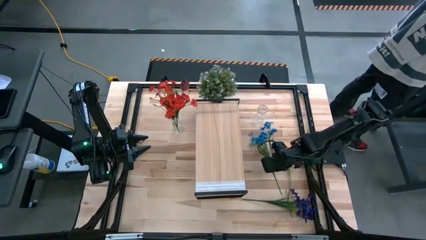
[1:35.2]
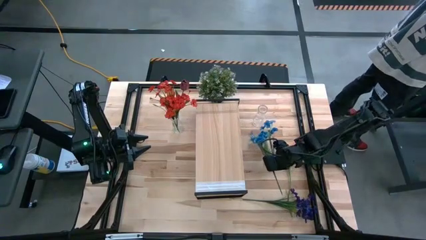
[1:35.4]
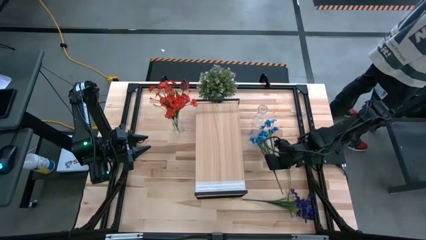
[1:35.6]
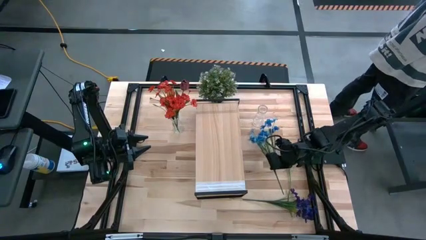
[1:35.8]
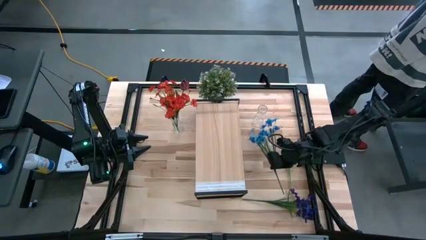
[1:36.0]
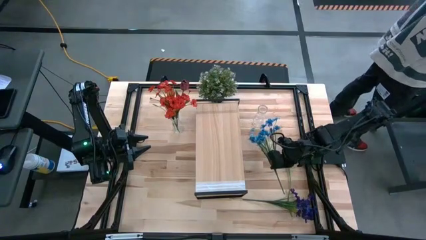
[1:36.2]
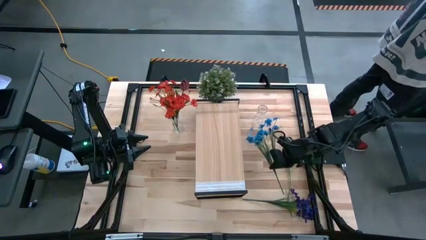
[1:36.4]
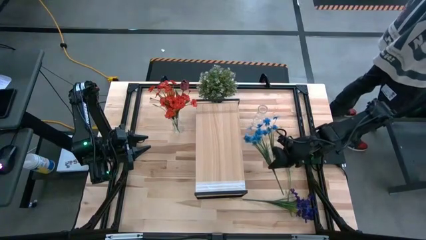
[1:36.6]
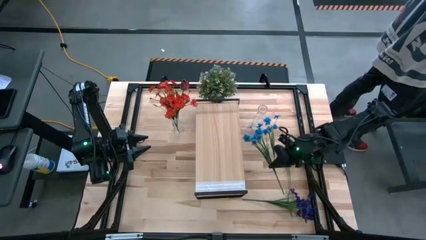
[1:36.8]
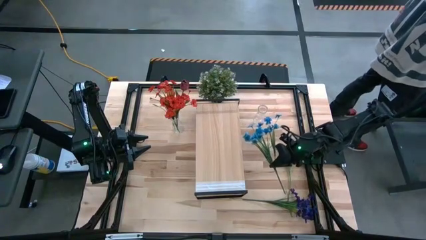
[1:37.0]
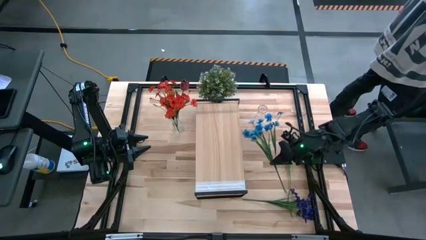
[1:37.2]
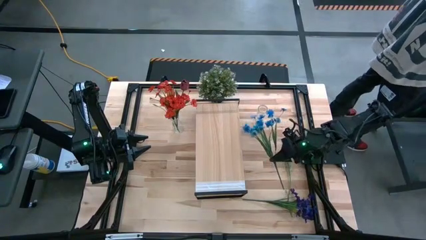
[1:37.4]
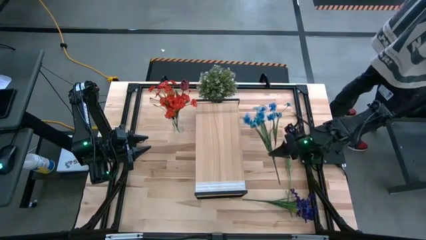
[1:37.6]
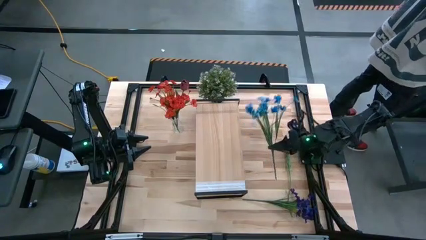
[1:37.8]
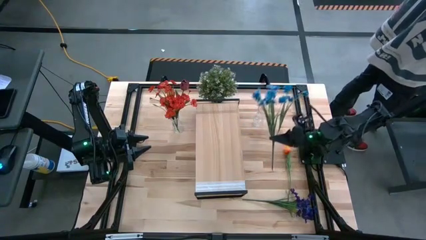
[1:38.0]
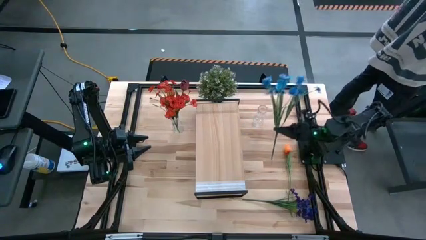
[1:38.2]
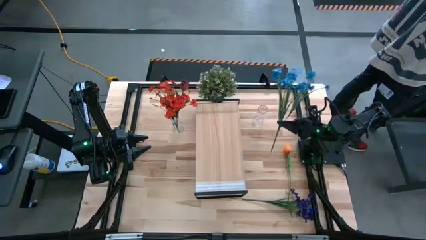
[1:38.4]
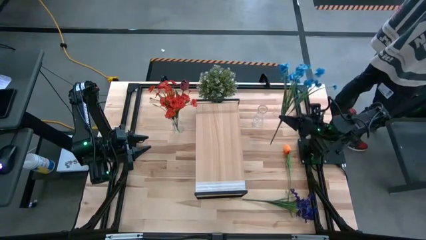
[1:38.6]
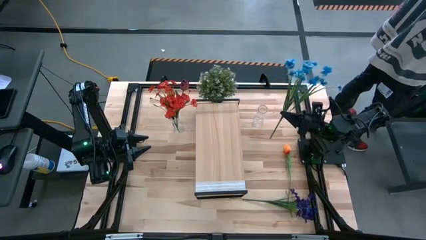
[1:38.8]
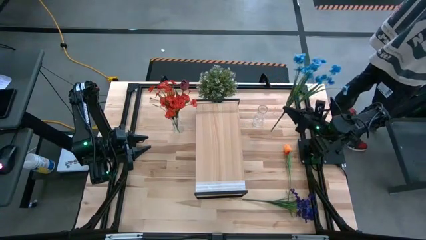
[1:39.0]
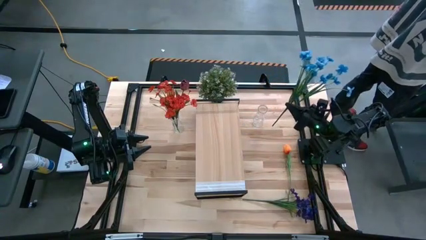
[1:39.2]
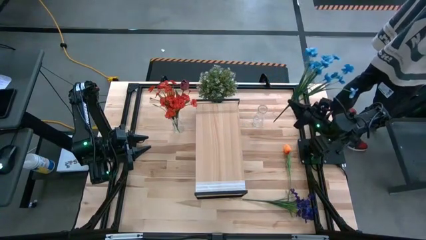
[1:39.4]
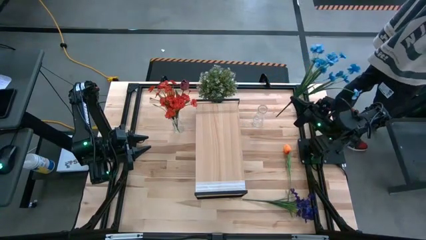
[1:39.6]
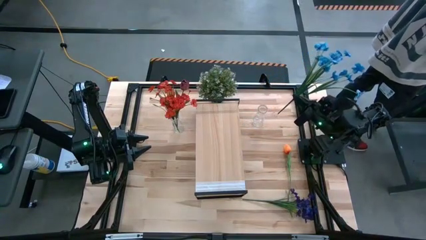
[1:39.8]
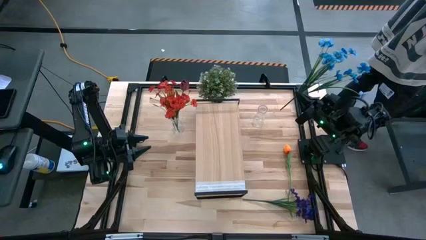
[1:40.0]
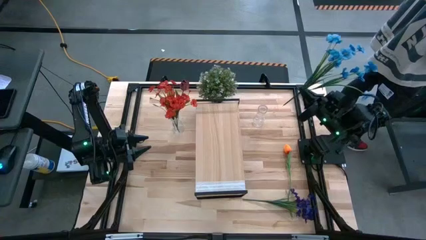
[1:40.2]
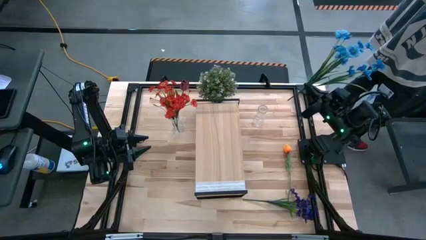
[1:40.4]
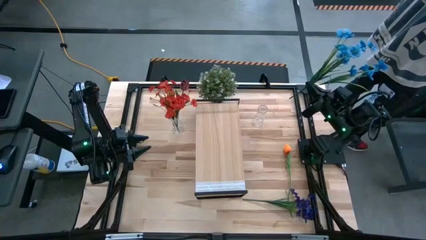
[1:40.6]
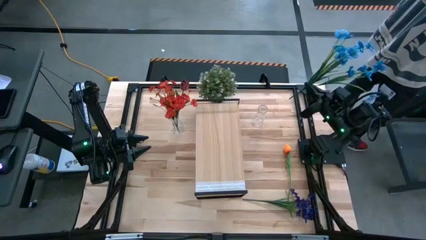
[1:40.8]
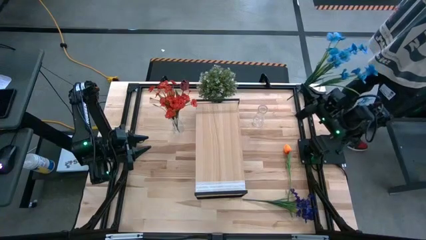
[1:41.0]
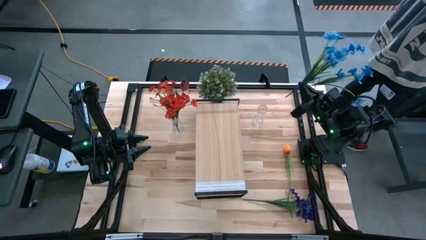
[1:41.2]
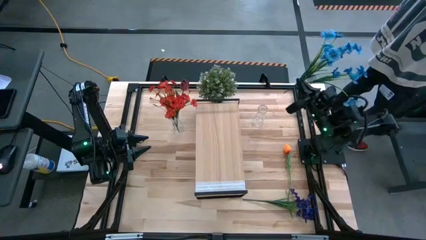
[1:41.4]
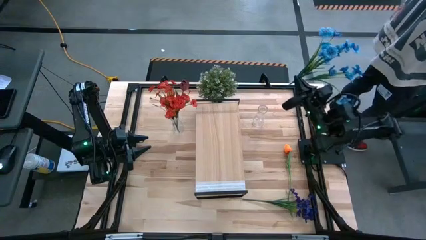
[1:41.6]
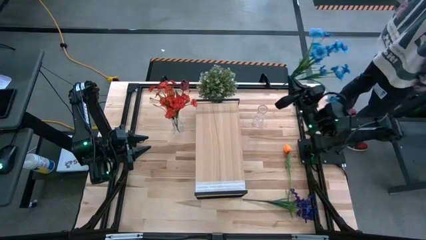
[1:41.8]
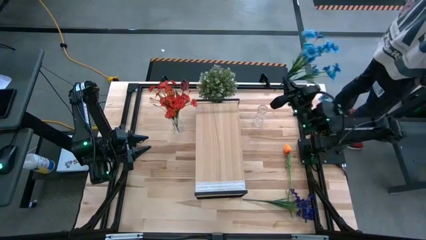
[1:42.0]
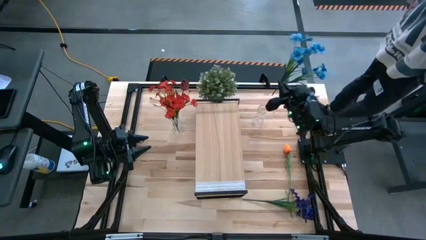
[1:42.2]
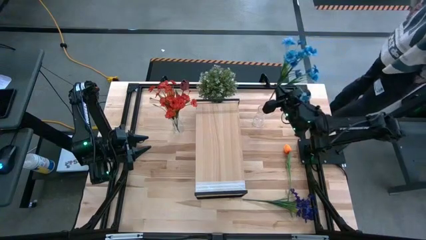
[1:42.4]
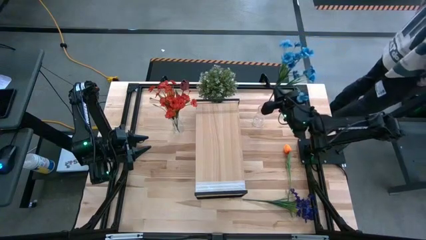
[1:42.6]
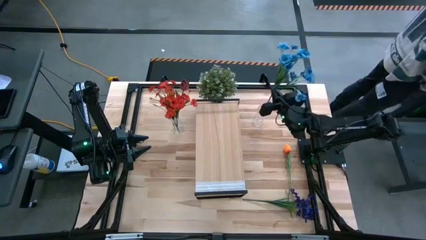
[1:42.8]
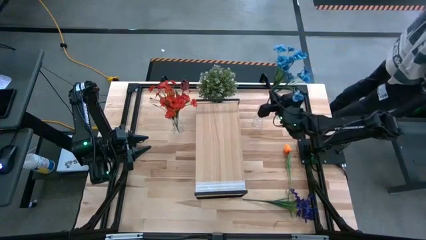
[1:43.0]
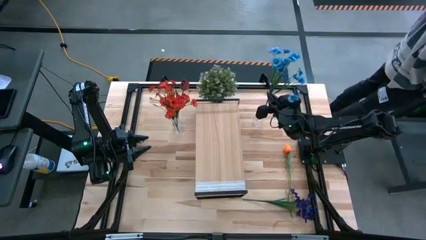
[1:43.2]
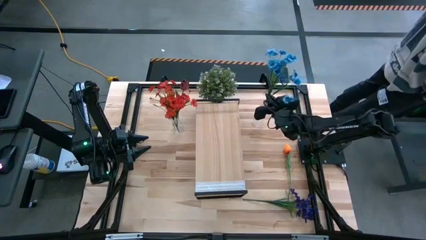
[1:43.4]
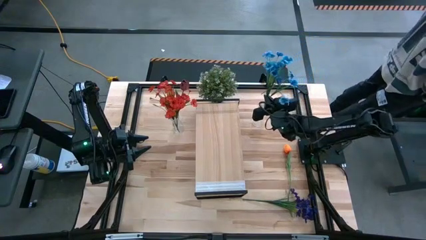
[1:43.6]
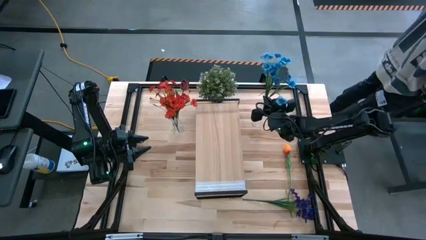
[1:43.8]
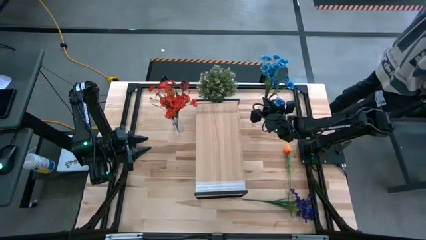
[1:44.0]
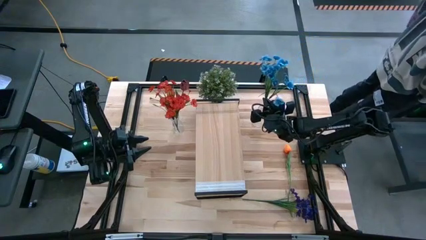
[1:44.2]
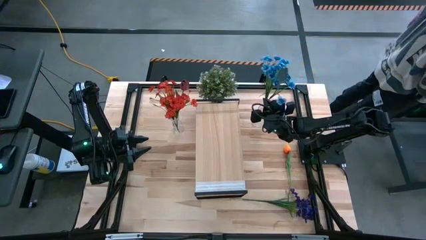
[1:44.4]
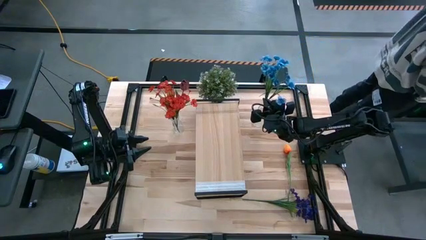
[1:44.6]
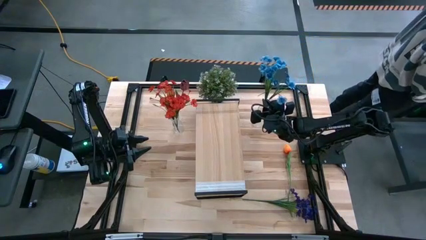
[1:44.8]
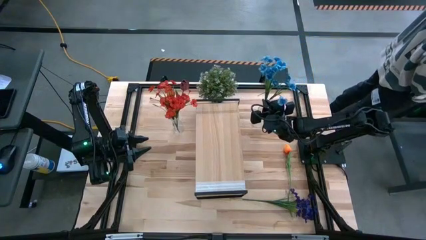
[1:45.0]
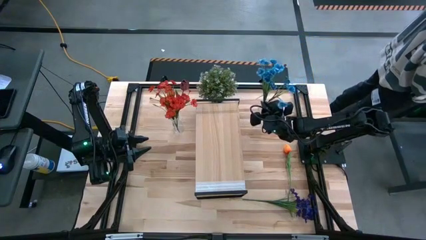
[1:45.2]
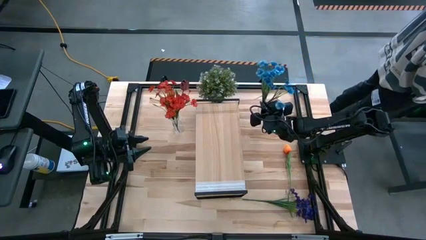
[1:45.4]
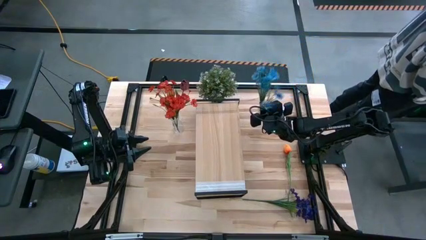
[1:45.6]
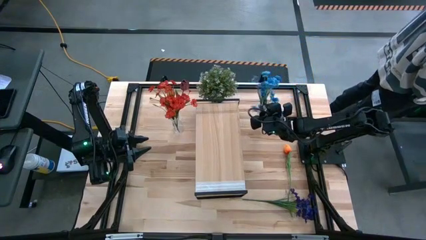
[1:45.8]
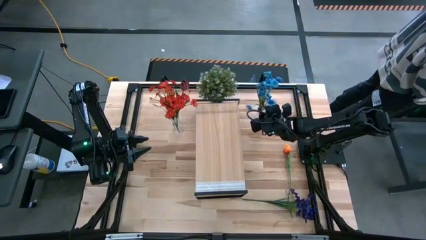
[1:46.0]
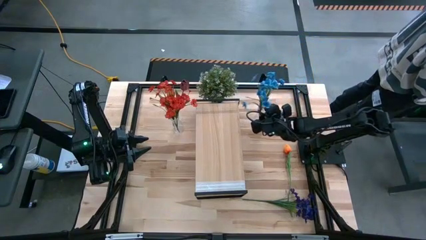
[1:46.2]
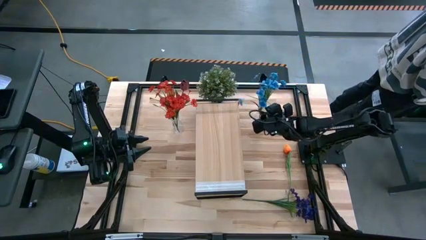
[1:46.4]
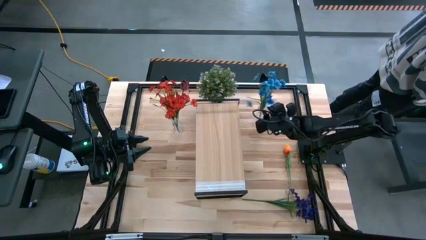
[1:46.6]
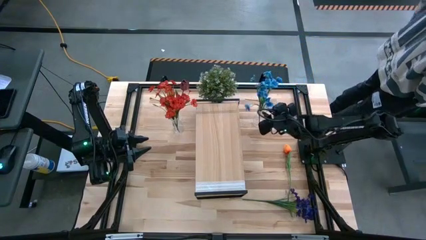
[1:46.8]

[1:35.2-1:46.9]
Task: Pick and place flowers into a vace then onto a shelf
Put the blue flowers into the right transparent vase
